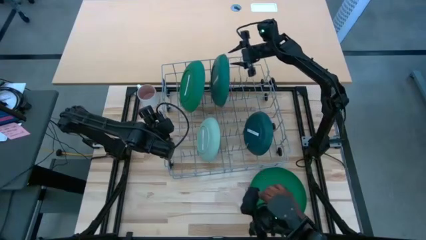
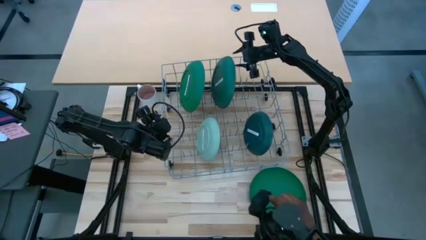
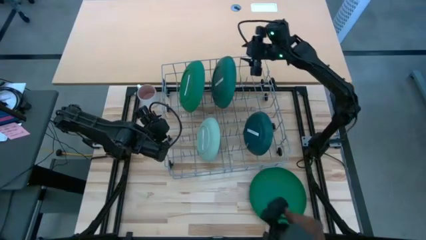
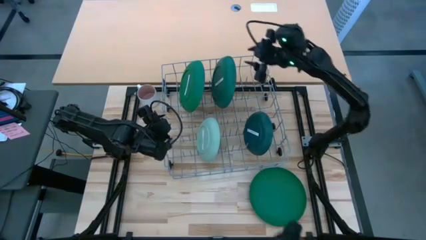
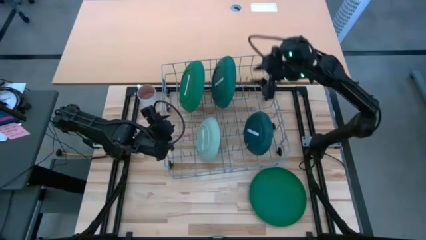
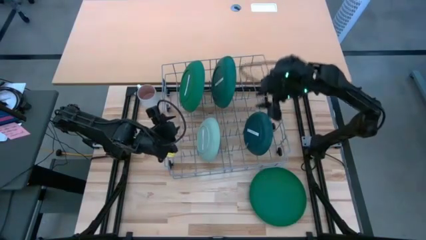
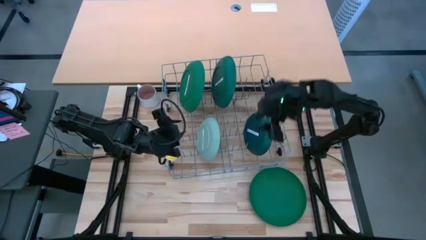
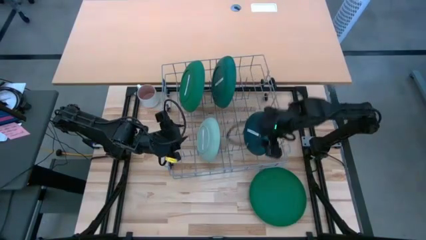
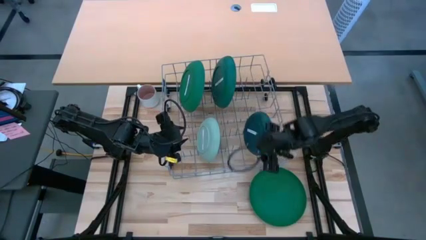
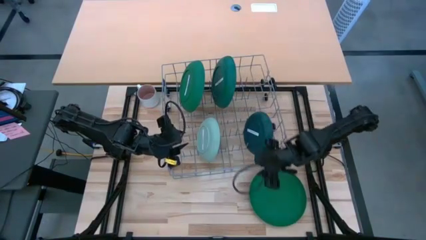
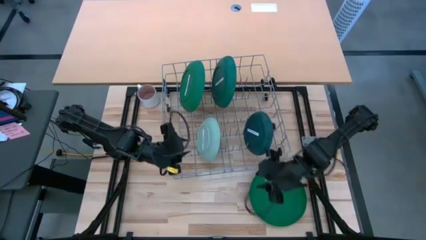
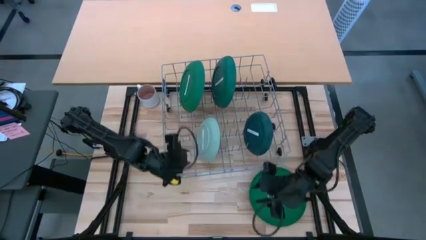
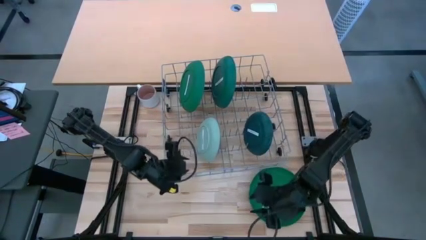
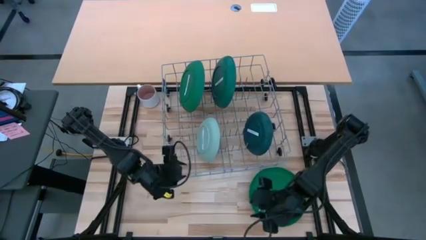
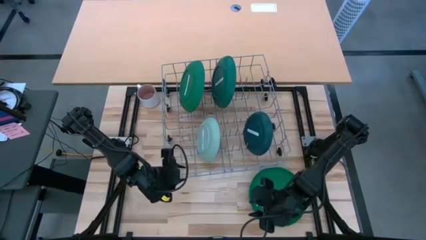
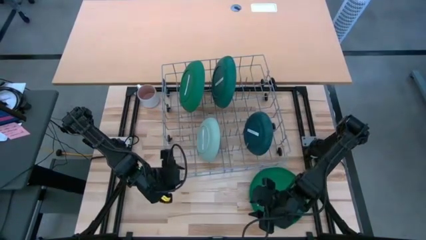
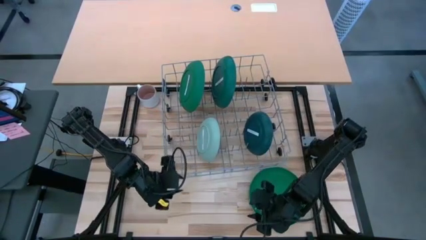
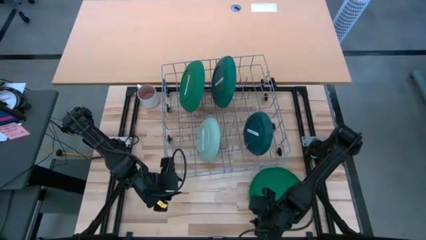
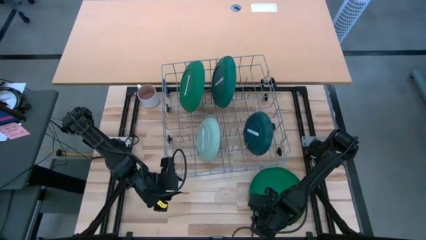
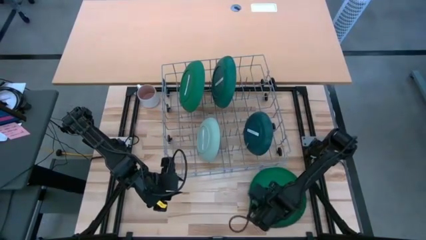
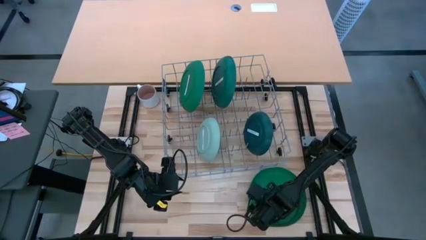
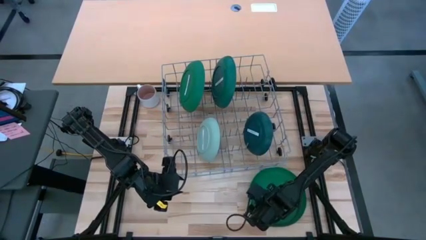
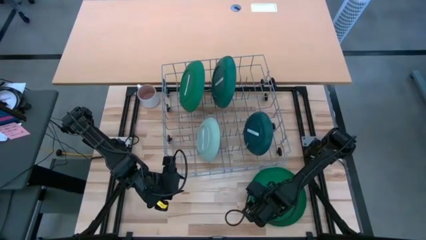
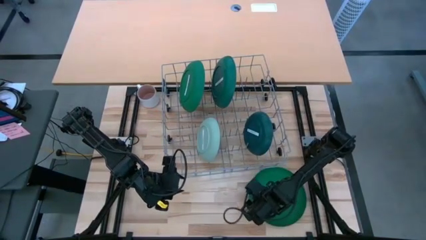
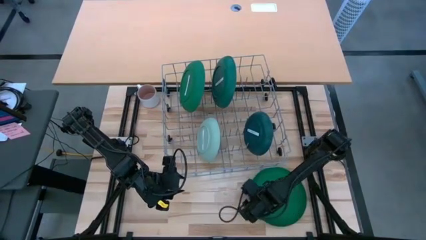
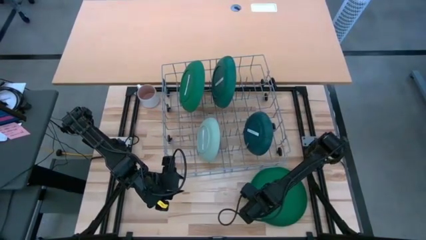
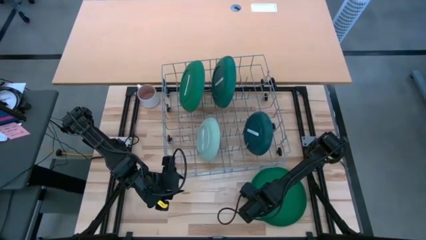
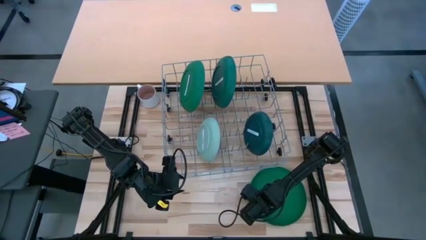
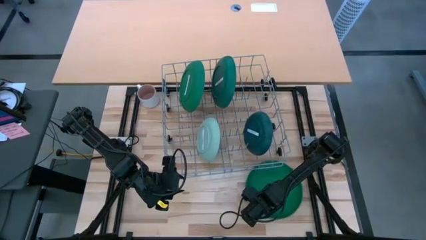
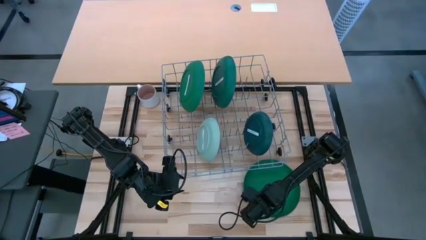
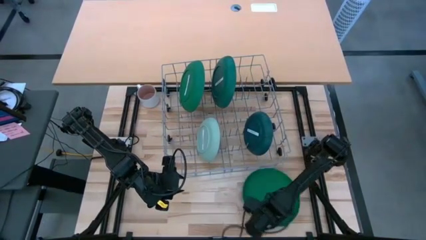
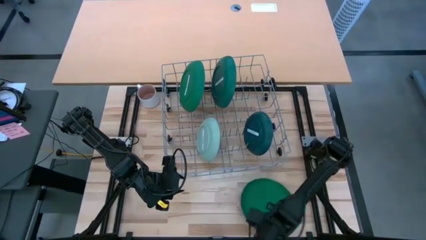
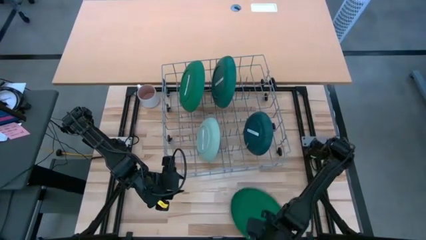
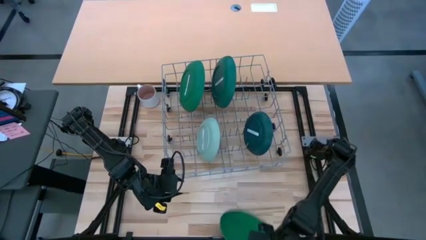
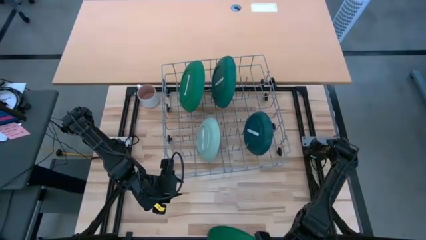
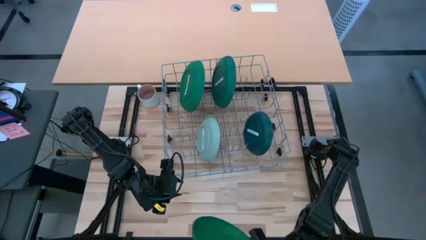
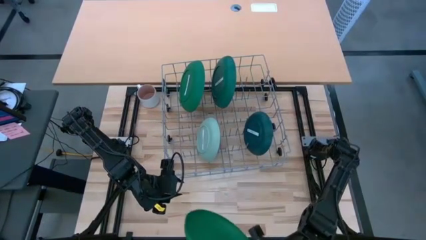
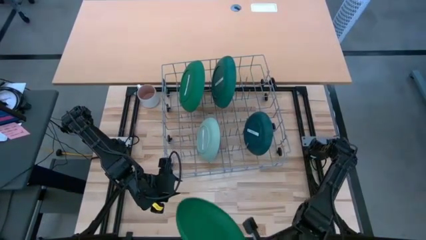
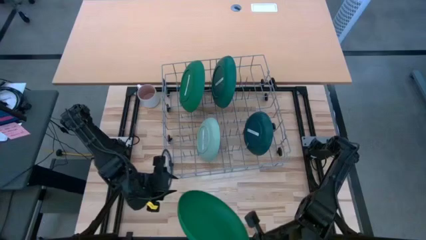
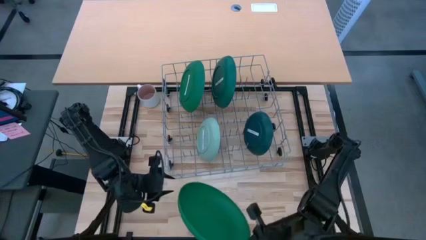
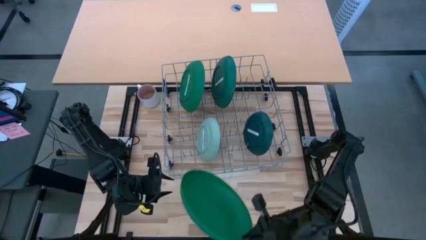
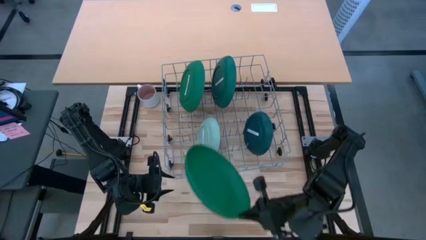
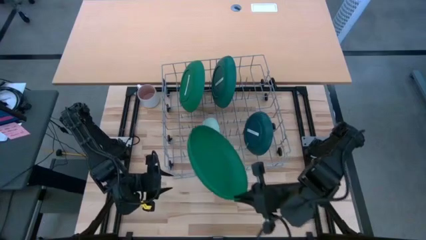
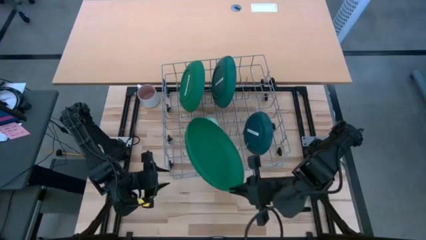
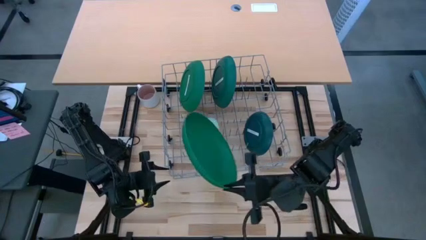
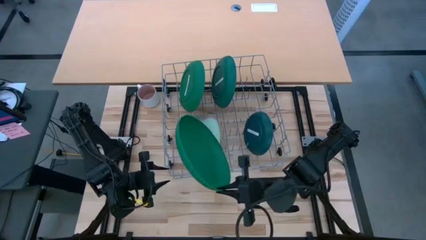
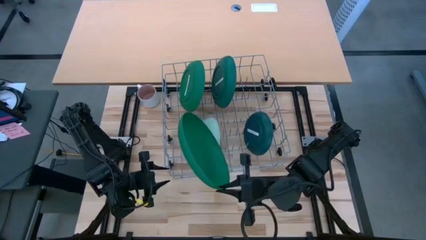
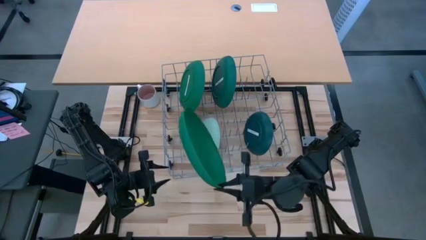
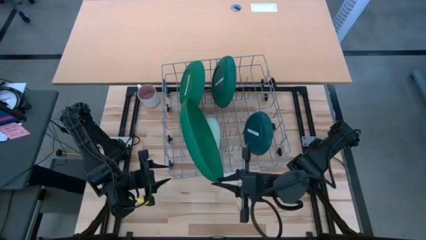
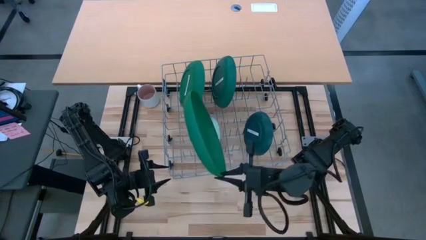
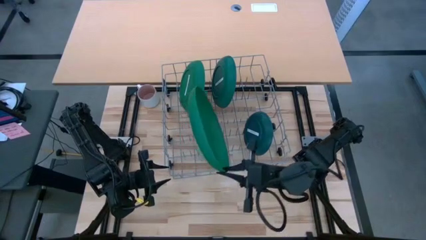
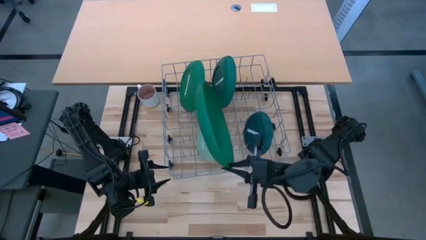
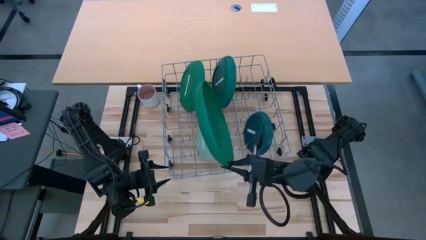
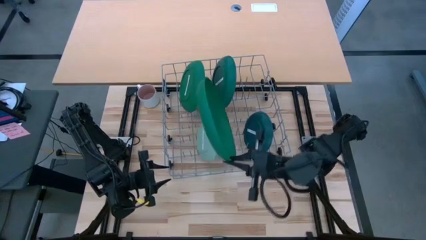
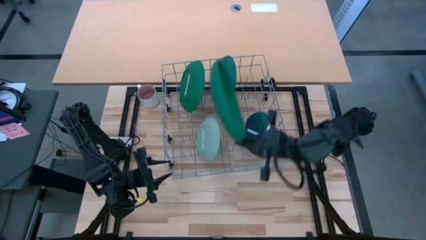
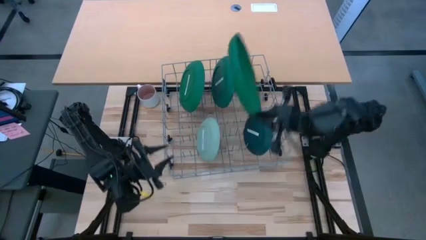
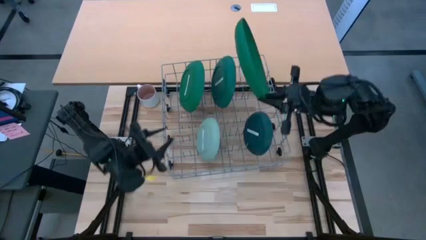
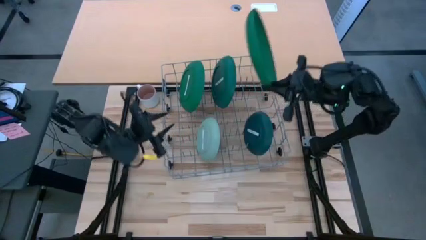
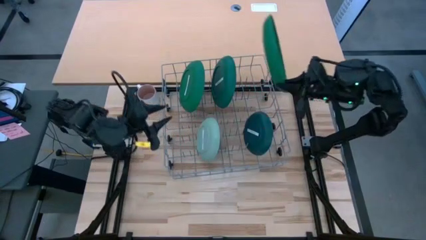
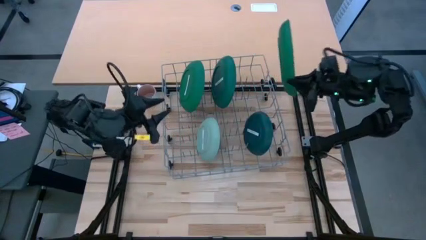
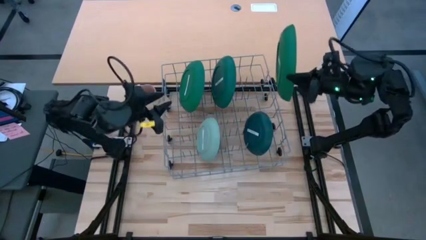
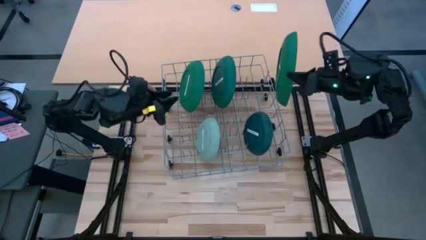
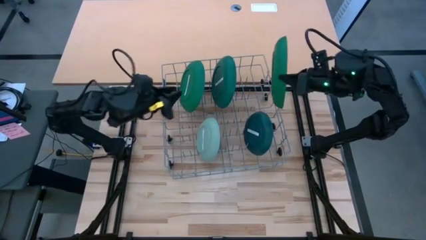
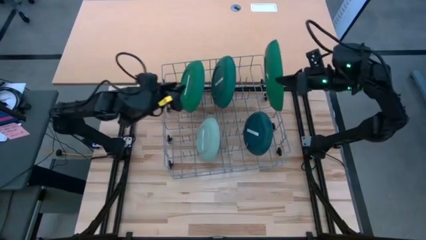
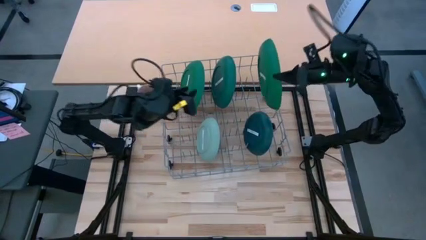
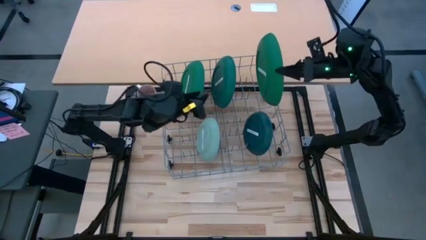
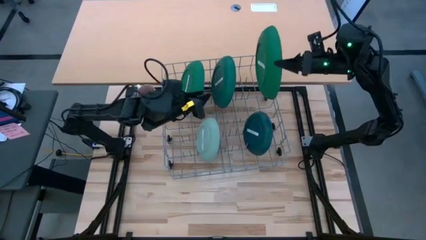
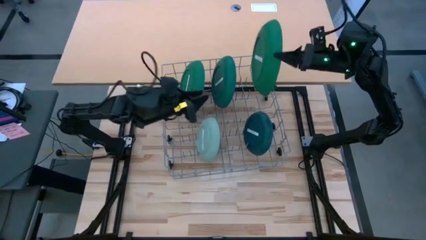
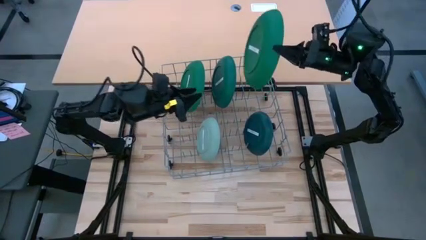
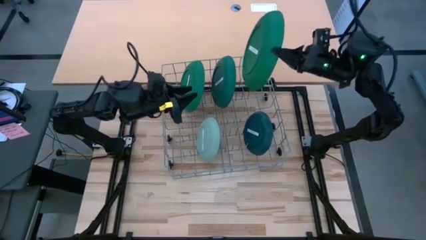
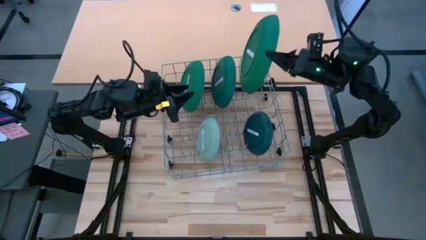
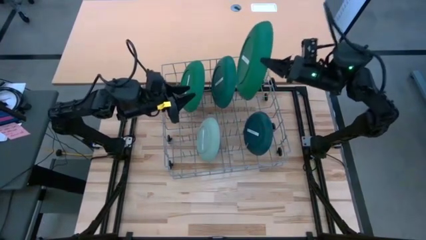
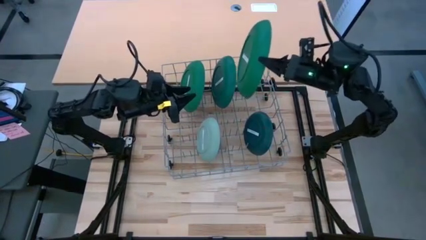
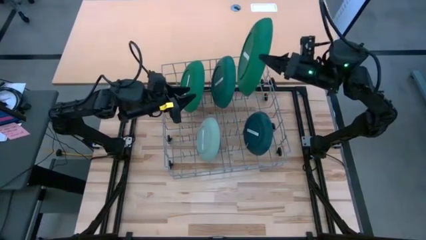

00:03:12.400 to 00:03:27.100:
Task: Sort dishes
Put the green plate in the dish rack
